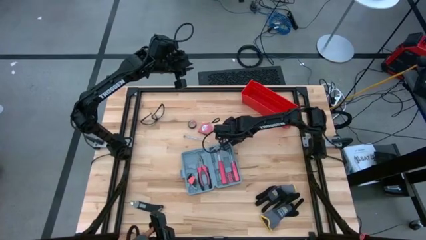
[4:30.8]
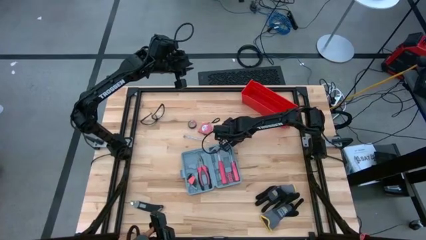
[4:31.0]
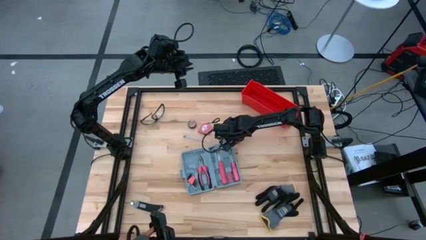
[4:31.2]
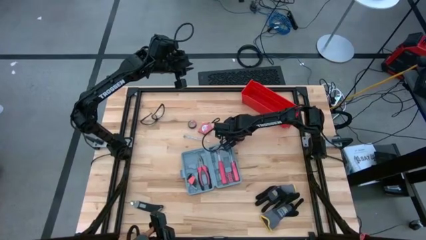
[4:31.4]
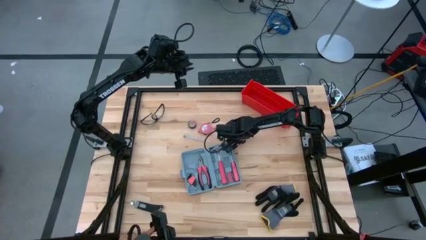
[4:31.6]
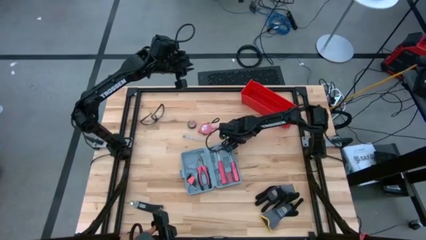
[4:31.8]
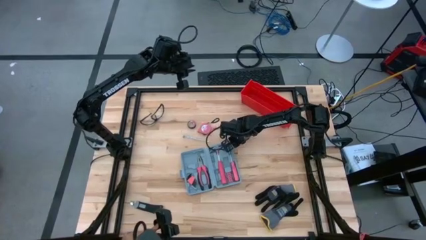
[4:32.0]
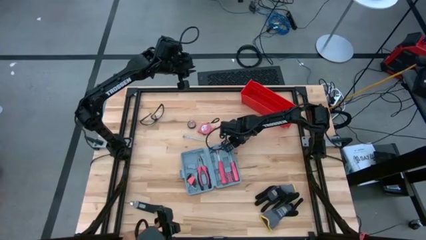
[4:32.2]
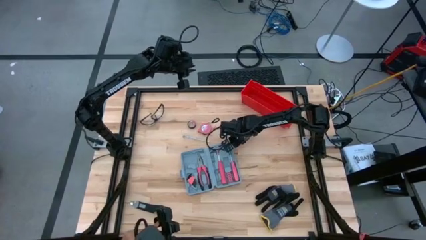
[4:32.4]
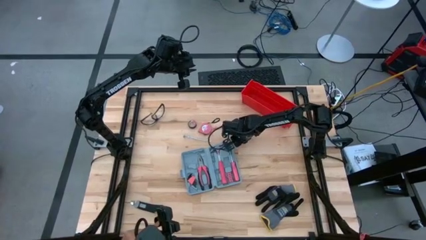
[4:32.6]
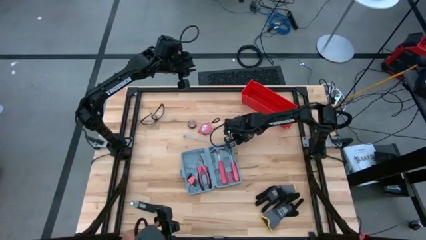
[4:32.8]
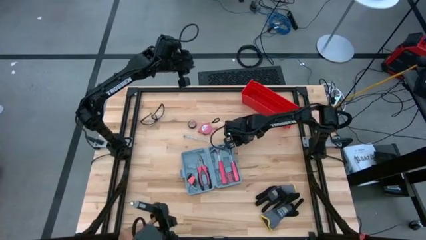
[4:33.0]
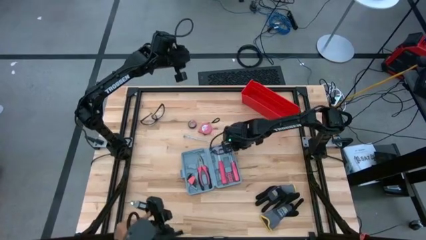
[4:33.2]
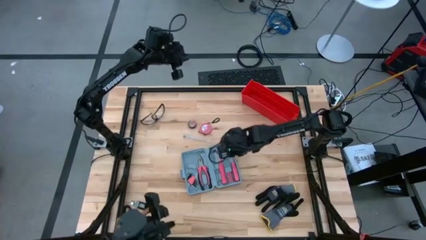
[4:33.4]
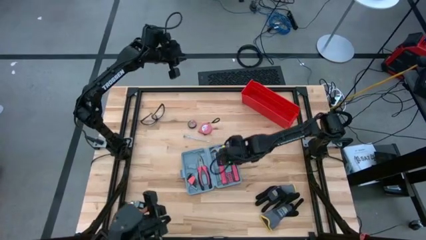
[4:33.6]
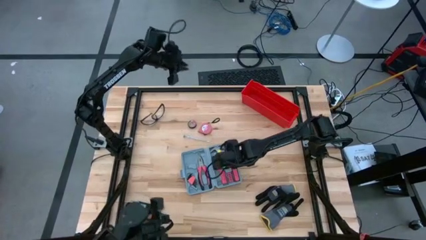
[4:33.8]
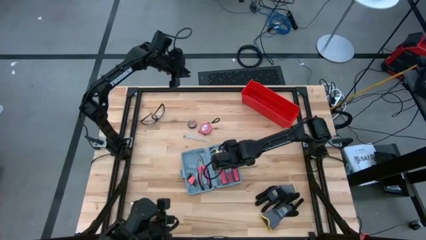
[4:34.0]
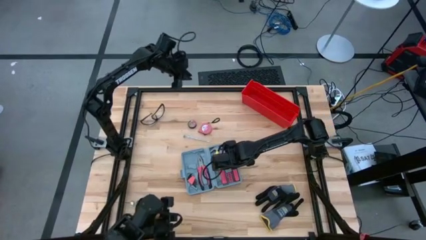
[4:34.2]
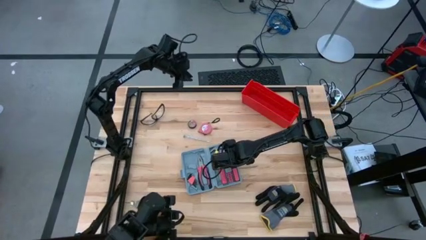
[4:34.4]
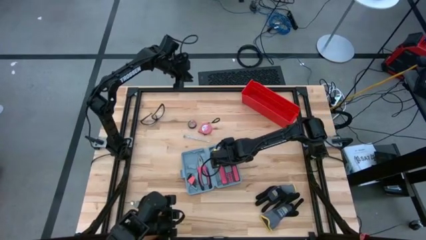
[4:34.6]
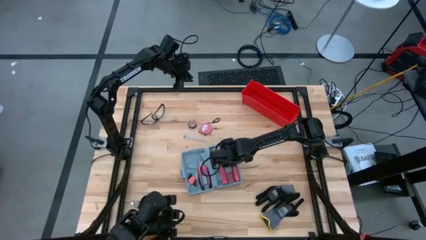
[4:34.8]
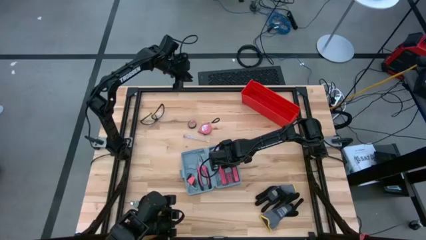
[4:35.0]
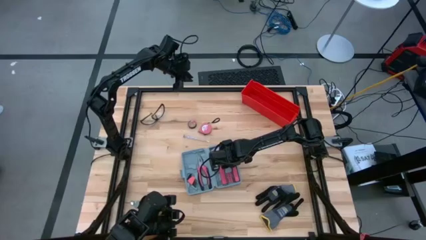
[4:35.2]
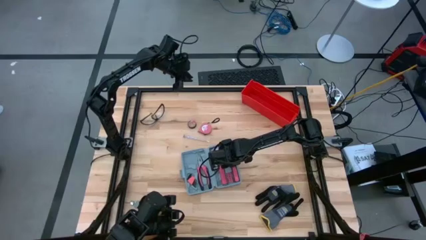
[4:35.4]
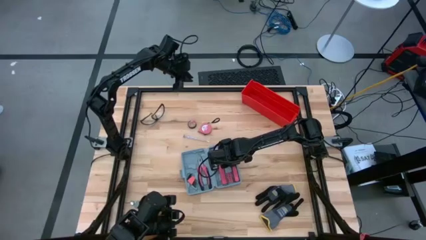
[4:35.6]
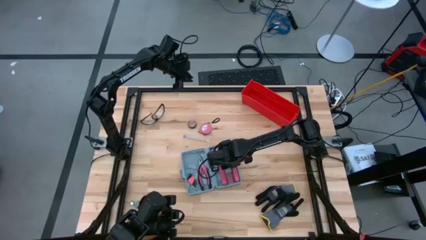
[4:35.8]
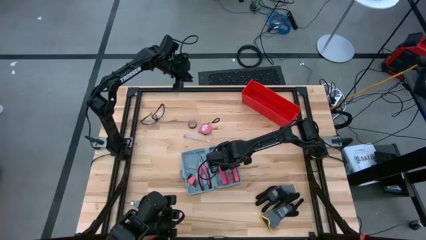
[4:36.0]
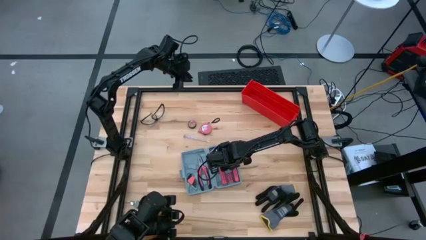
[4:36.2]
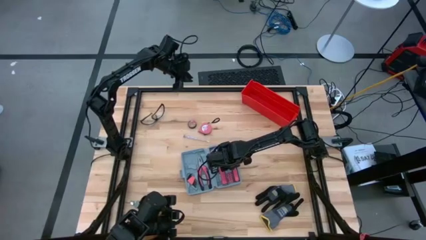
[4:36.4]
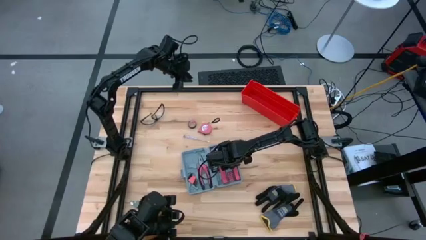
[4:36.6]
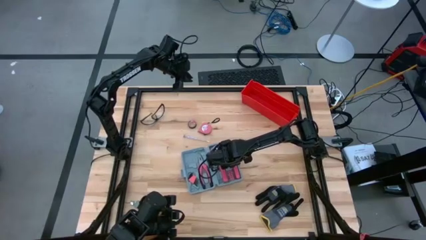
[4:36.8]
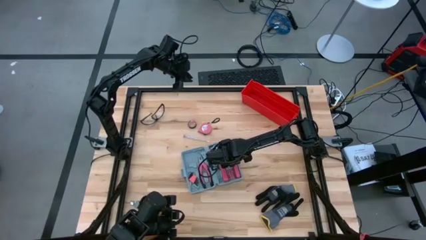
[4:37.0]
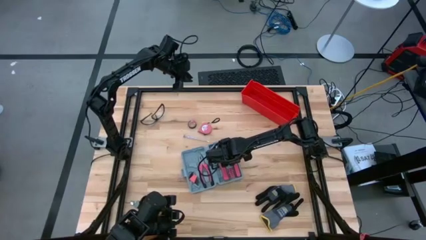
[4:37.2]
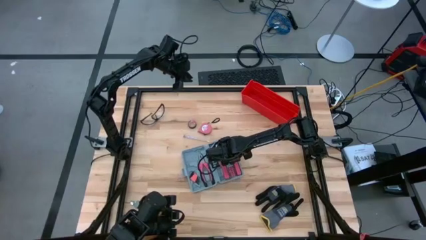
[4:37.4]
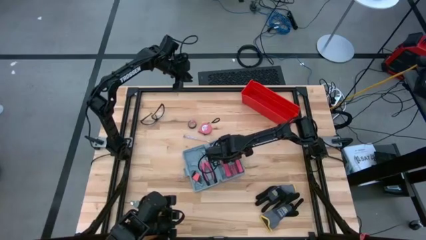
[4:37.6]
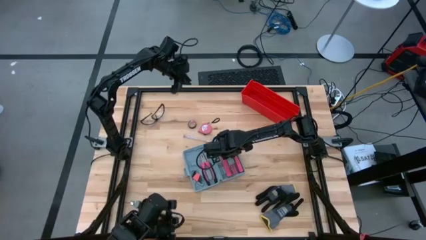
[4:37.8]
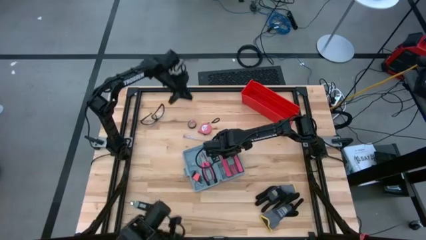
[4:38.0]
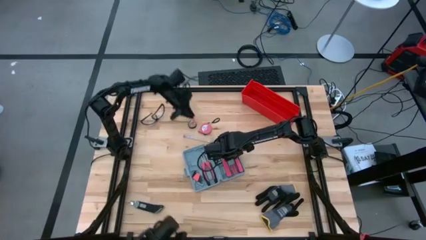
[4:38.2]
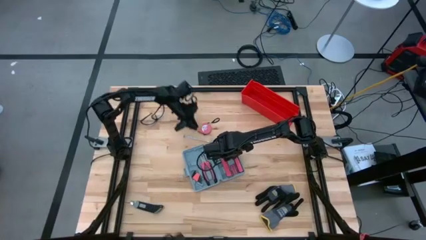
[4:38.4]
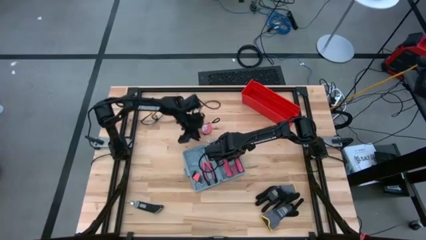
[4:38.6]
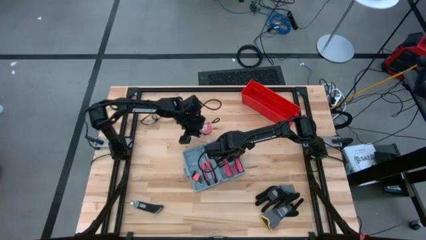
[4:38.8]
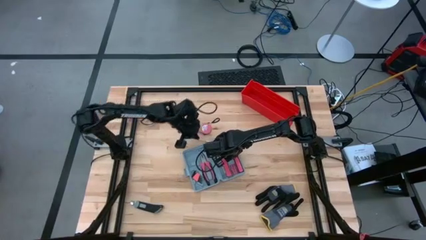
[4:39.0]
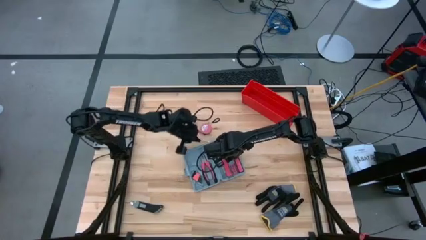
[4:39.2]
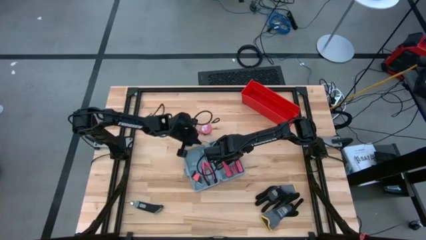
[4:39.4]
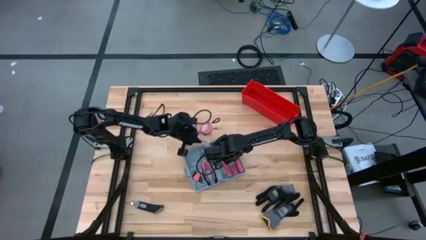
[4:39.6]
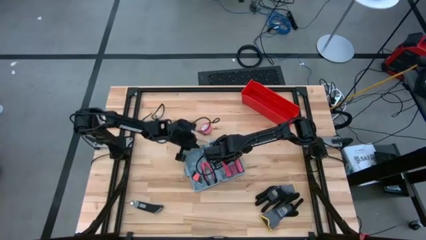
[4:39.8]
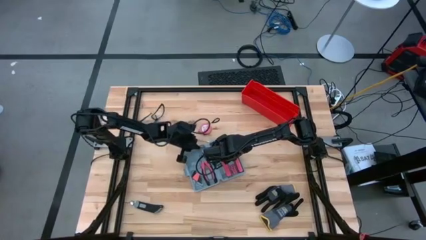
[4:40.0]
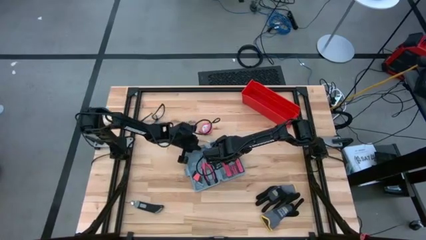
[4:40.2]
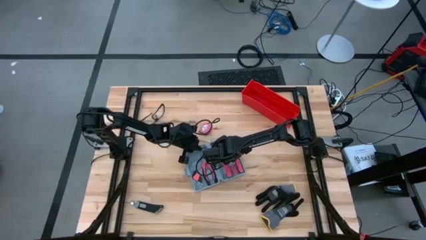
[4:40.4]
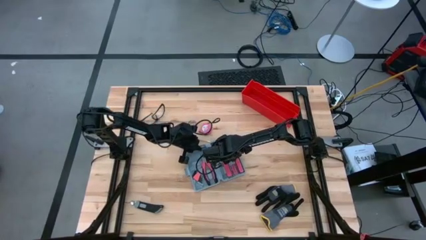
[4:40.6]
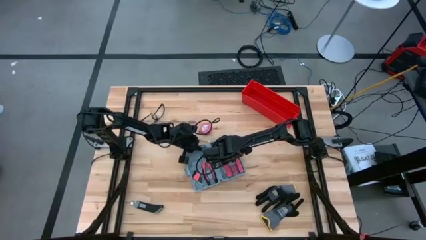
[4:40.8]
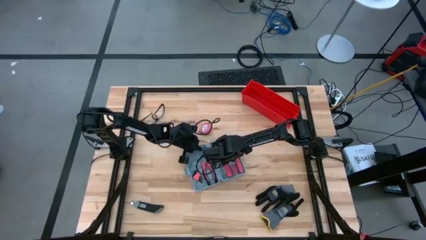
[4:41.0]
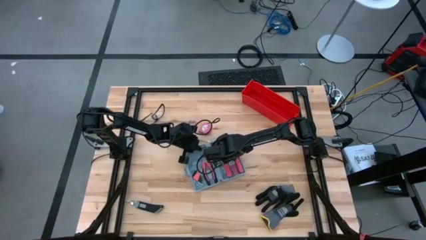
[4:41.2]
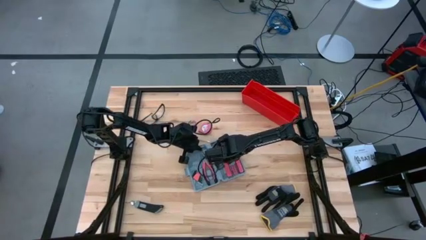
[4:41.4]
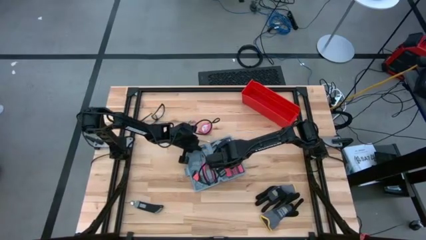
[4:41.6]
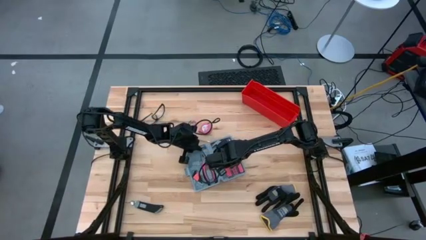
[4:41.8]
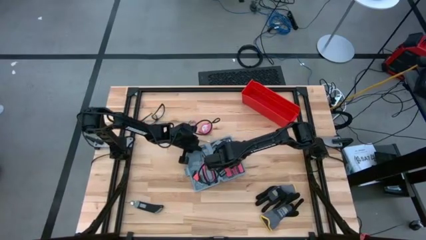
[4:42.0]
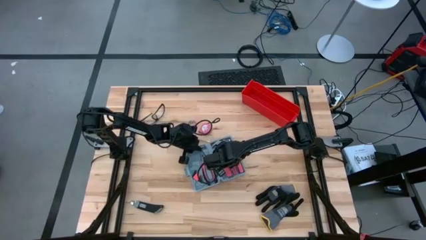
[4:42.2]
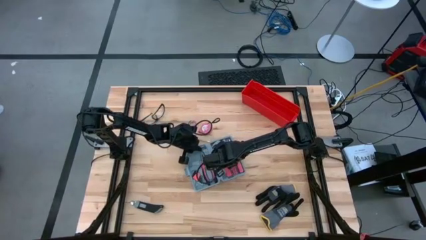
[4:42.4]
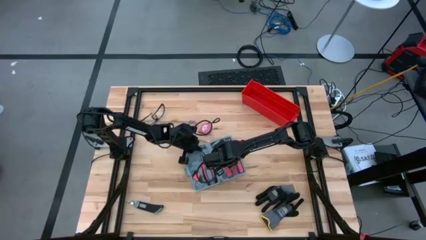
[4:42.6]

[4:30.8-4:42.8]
Task: prefit tool cases
Put the screwdriver bits into the toolbox

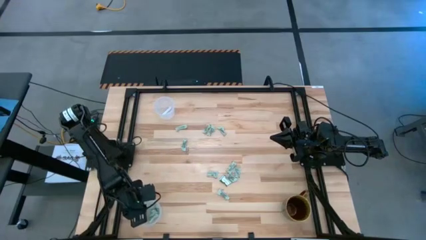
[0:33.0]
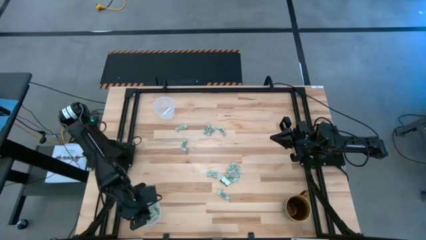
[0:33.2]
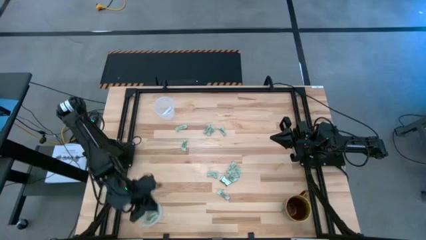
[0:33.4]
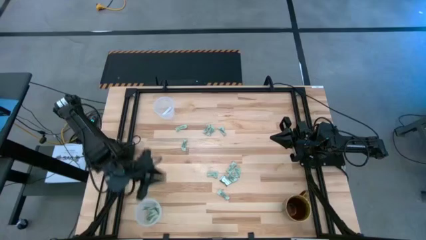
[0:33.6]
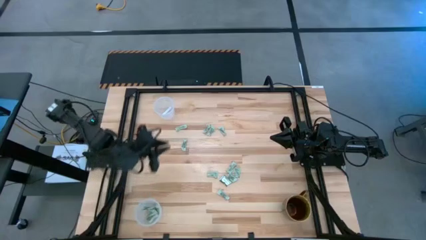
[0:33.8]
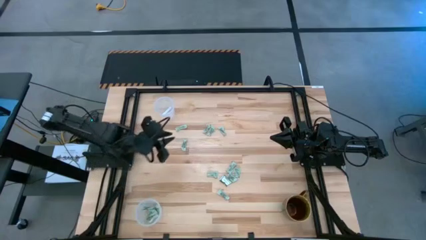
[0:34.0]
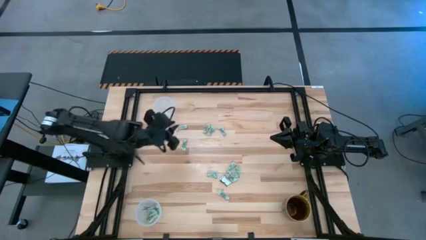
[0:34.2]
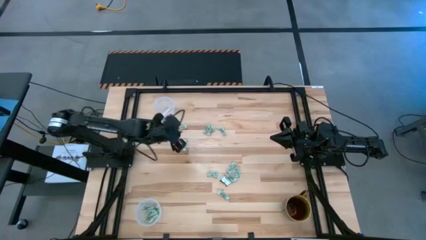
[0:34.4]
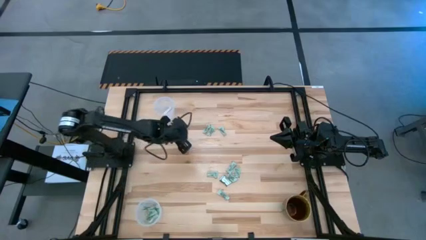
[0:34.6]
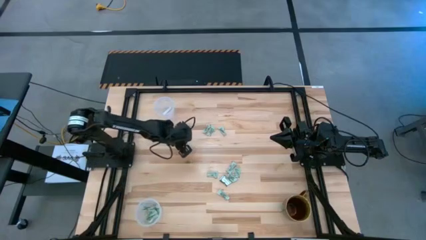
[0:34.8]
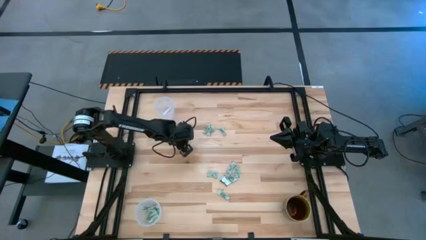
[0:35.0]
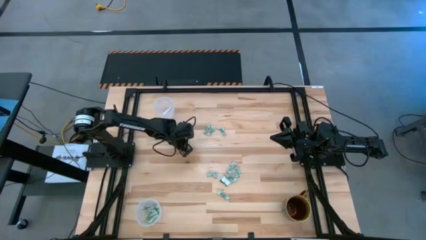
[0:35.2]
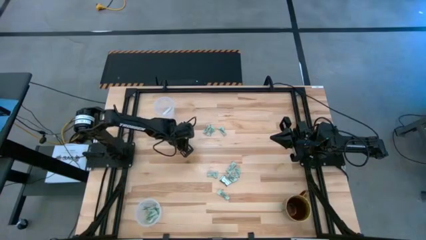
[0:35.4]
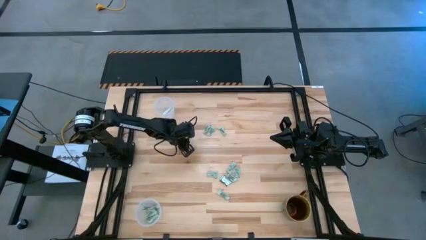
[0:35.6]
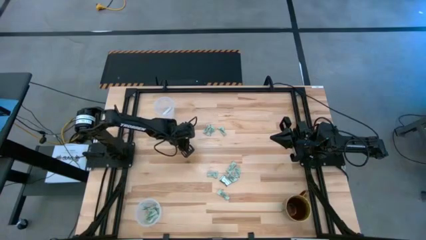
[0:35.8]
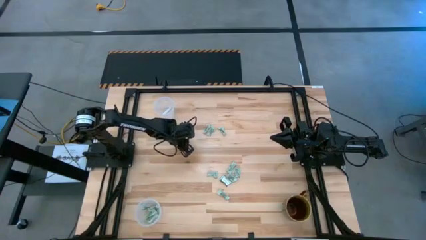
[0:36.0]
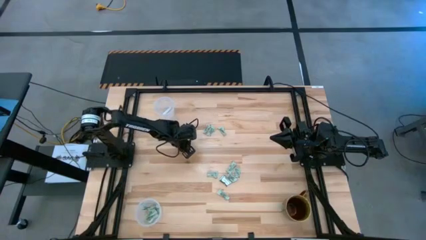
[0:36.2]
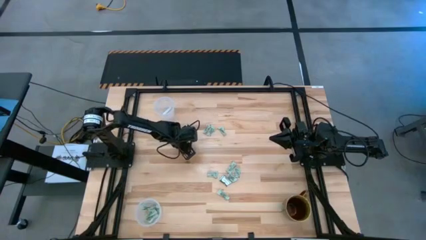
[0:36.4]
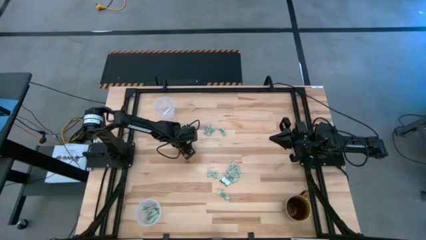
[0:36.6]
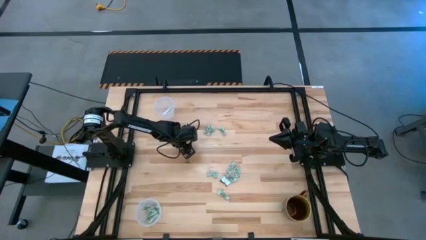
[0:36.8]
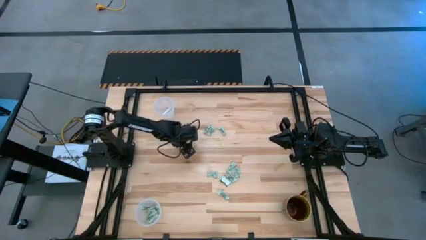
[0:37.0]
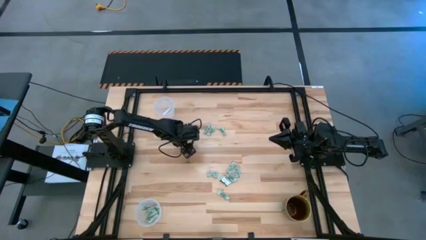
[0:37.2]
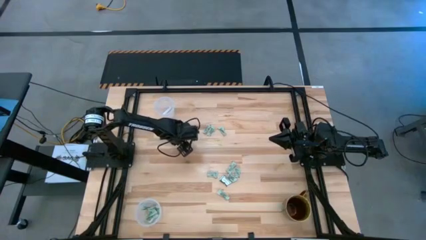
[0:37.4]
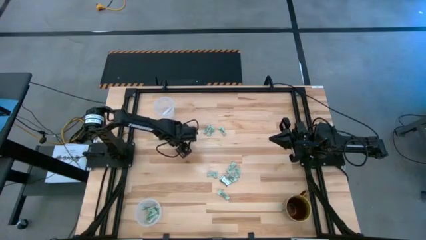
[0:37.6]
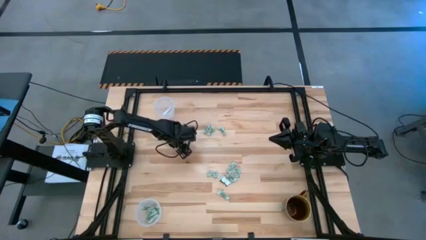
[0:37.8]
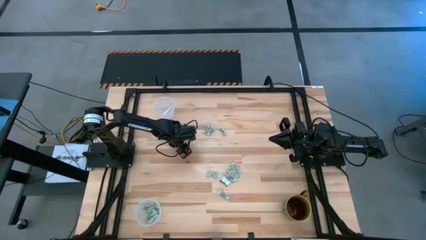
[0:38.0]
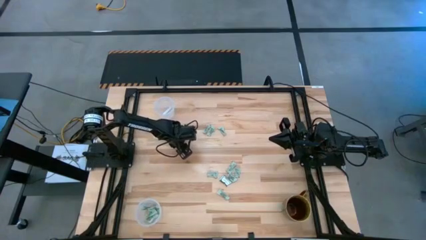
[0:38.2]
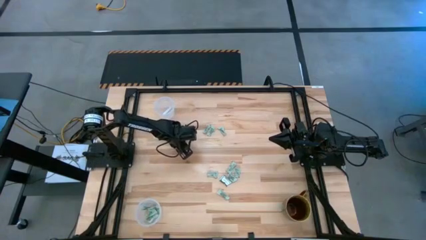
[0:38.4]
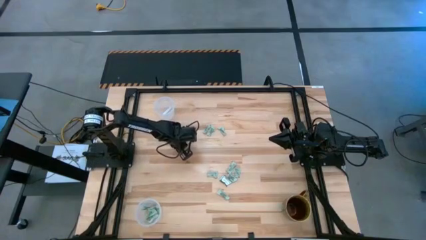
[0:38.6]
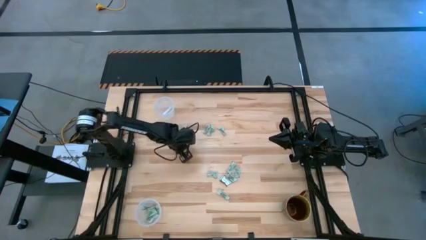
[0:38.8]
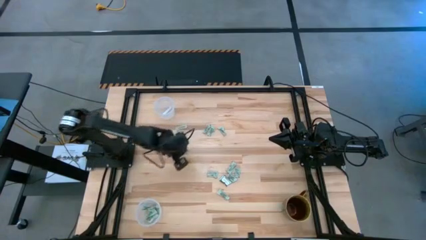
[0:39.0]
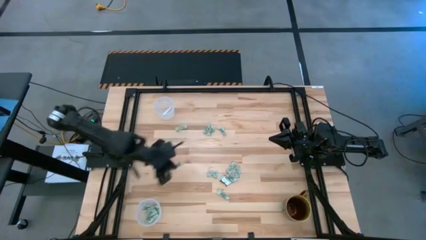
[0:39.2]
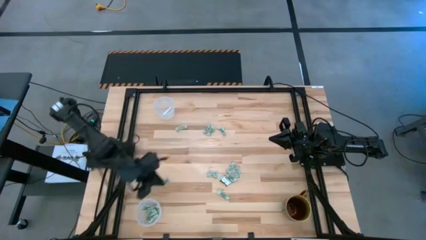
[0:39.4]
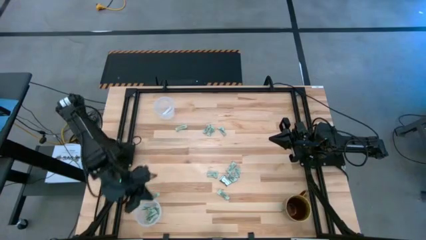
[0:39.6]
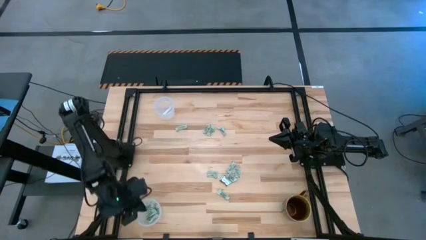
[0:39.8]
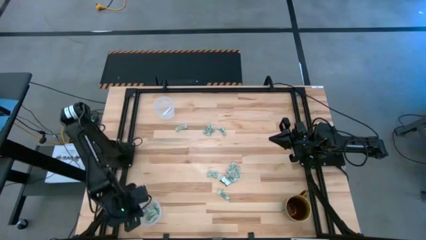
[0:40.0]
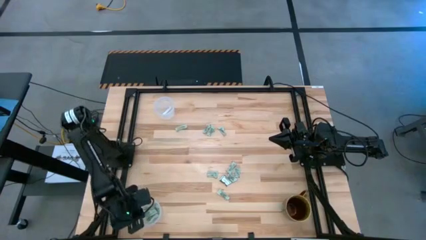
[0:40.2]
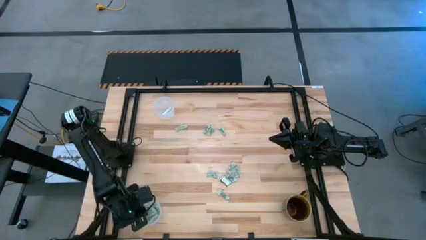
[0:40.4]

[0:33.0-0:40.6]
Task: Pick and place Stevia / Truvia into bins
Put the stevia packet into the bottom transparent container
